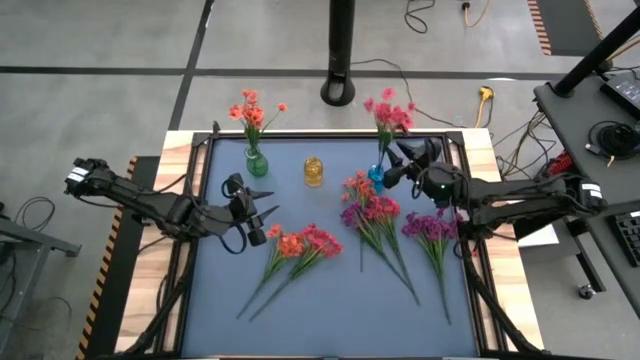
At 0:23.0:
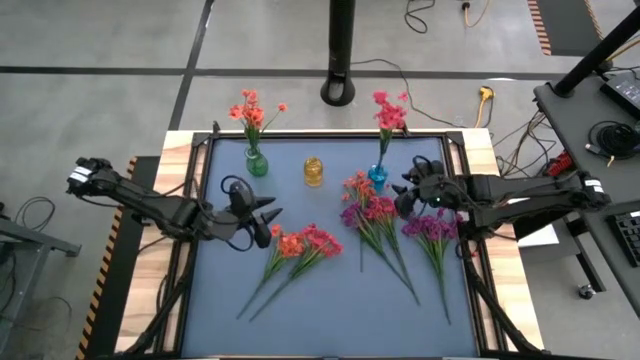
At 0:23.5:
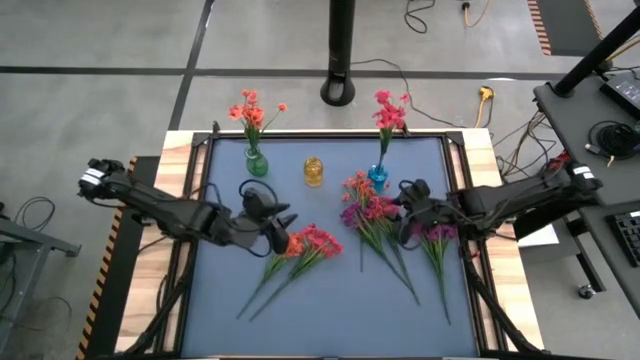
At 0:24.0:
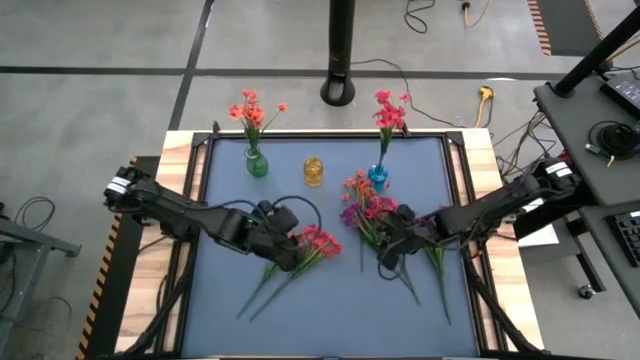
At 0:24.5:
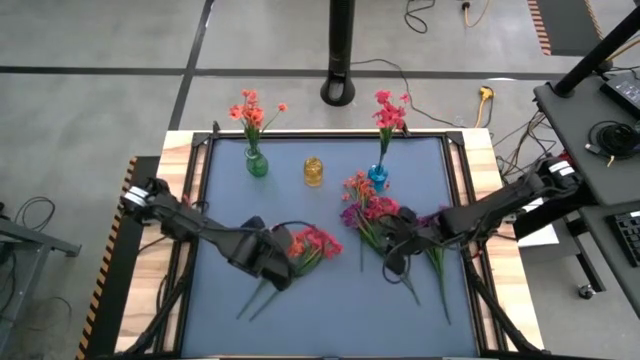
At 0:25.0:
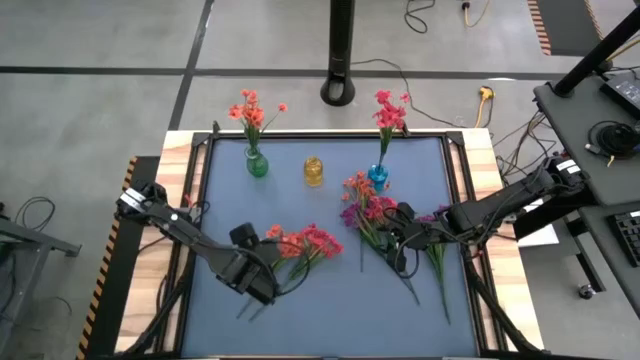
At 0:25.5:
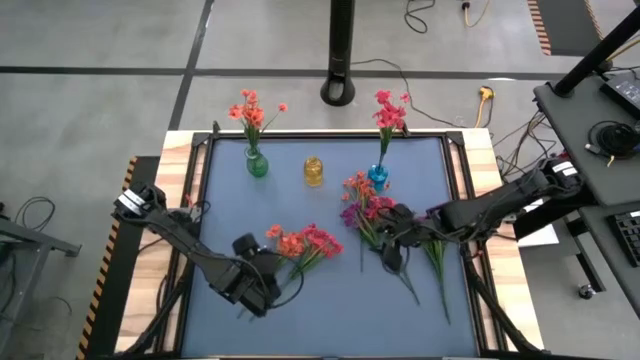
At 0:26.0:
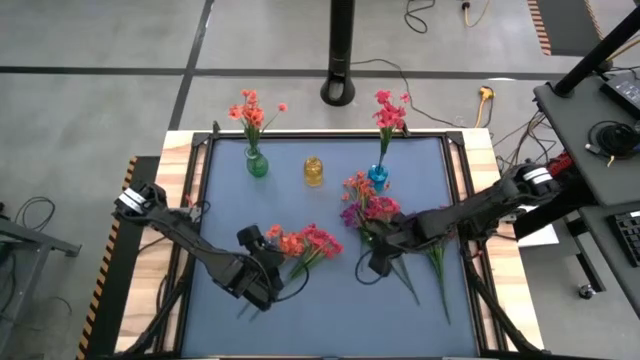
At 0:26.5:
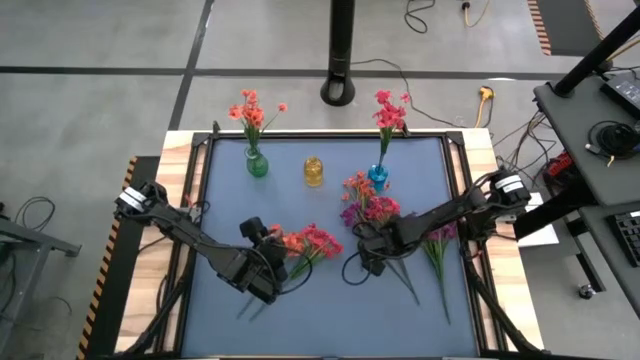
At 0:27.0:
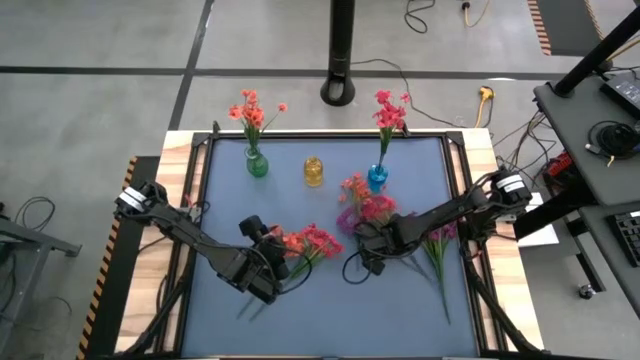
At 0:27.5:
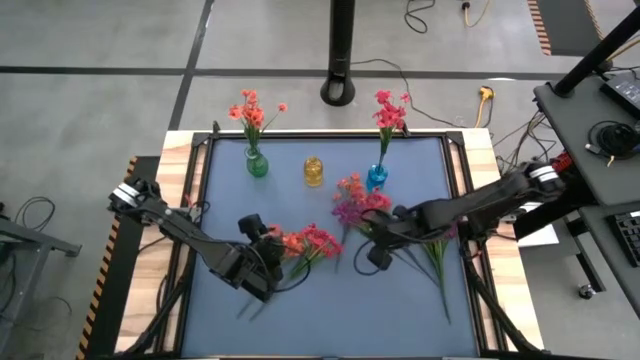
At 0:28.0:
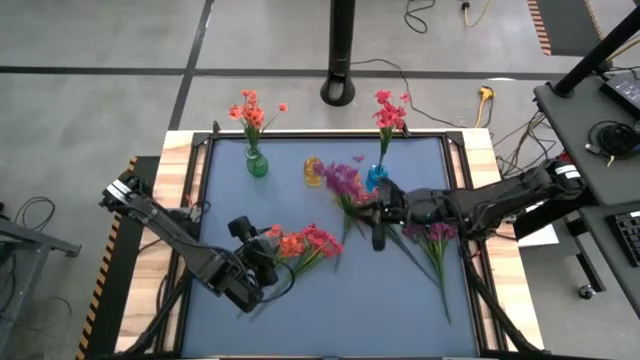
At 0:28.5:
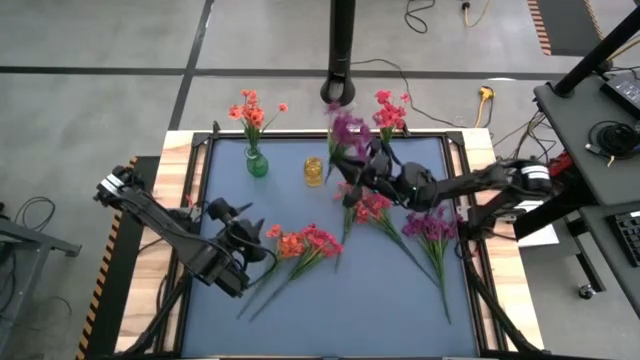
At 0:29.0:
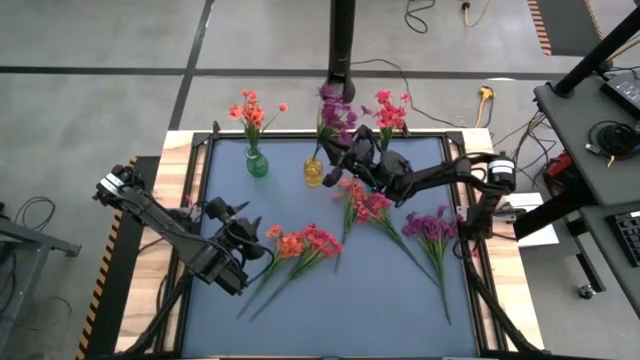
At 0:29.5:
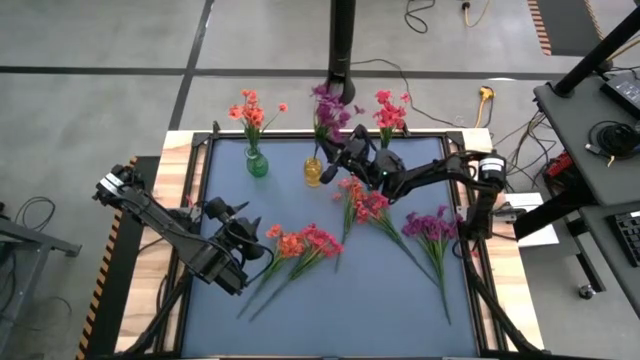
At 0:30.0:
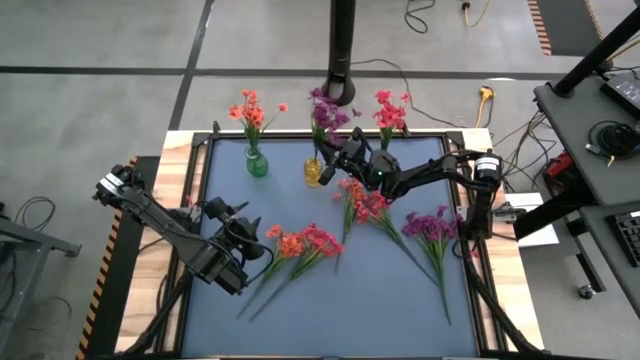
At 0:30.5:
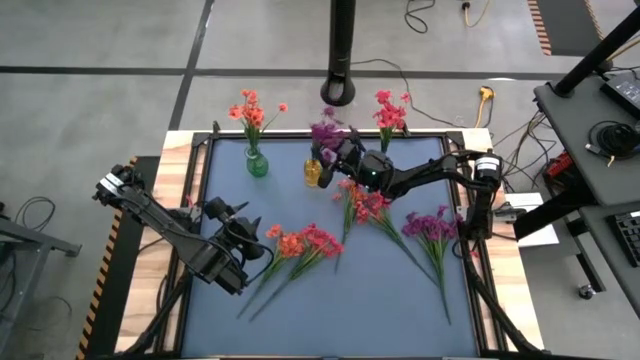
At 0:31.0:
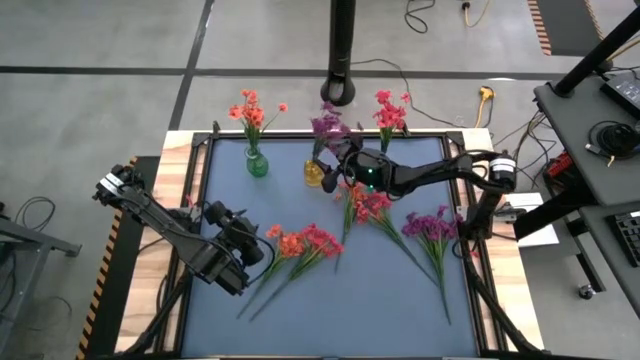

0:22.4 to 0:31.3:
Task: Sort flowers into vase by color
Put the left violet flowers into the yellow vase

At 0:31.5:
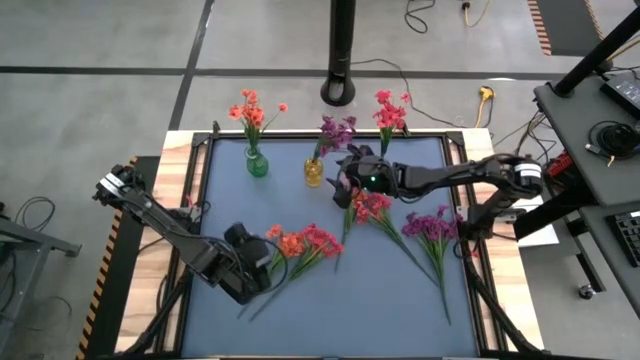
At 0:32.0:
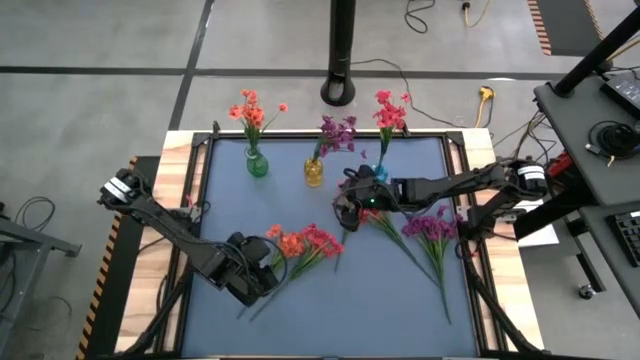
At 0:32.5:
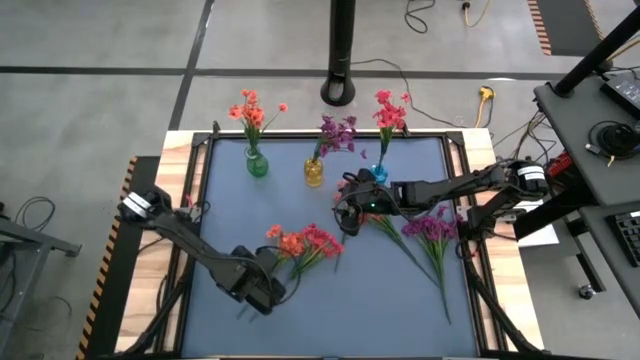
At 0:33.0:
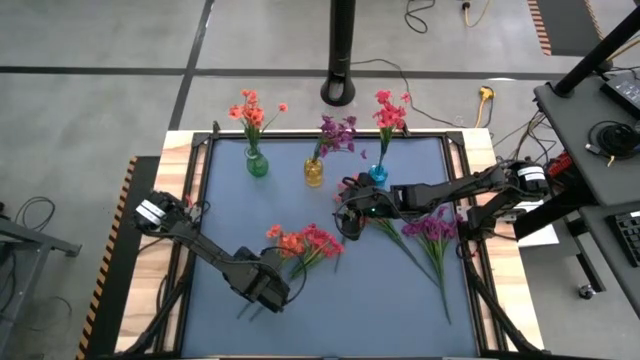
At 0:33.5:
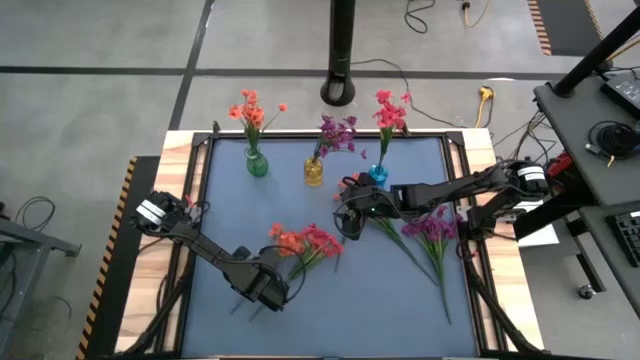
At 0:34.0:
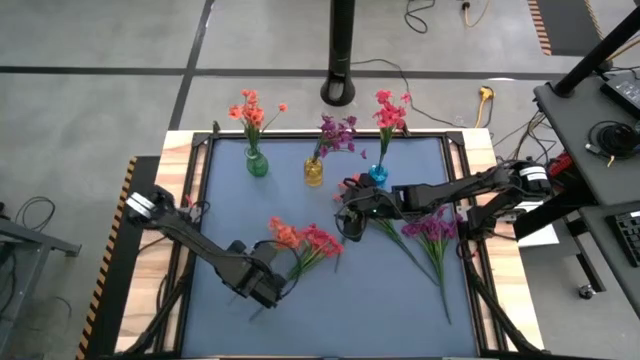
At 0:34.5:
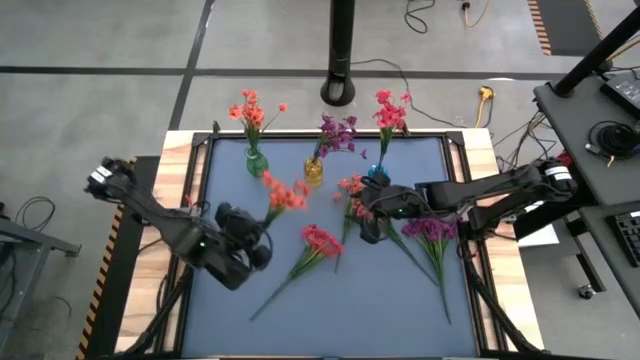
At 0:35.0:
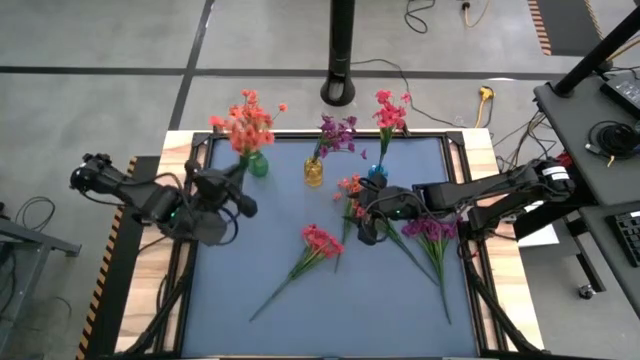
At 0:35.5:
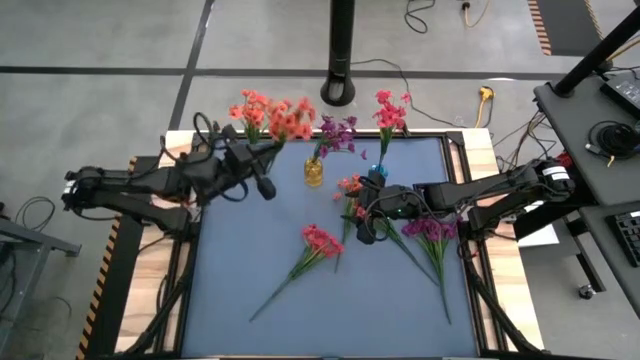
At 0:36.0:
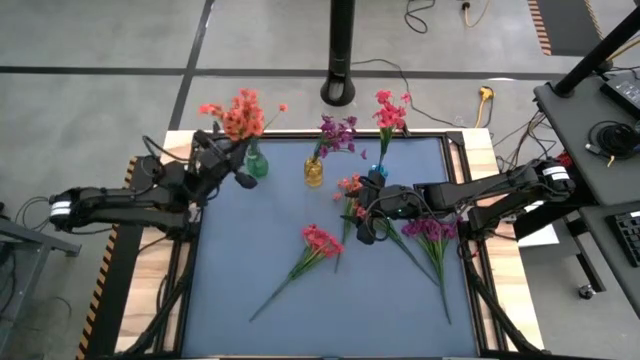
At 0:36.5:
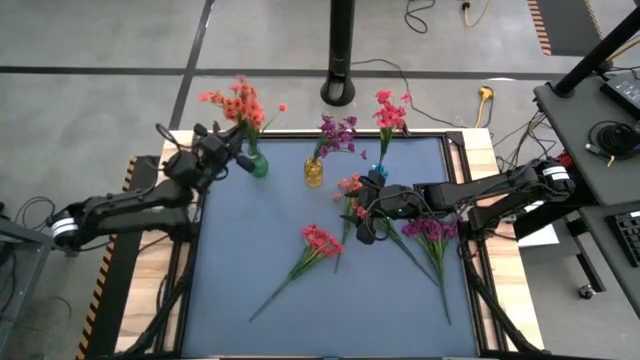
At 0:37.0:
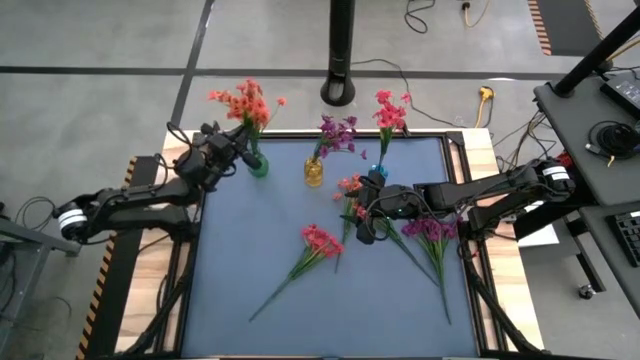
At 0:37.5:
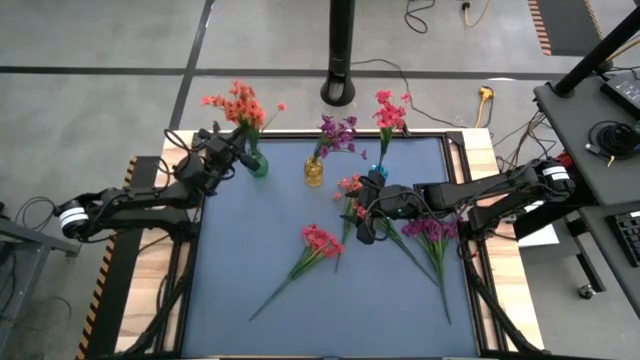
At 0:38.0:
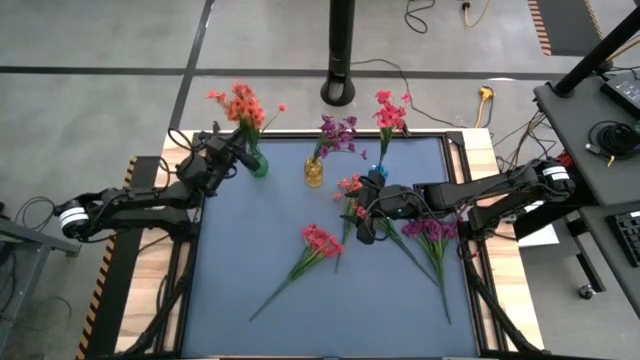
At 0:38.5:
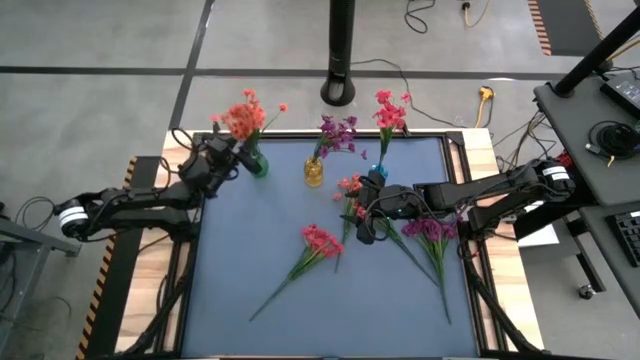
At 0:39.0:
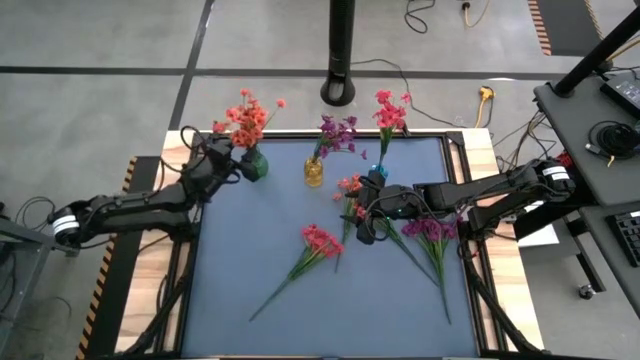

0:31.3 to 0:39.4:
Put the bottom orange flowers into the green vase

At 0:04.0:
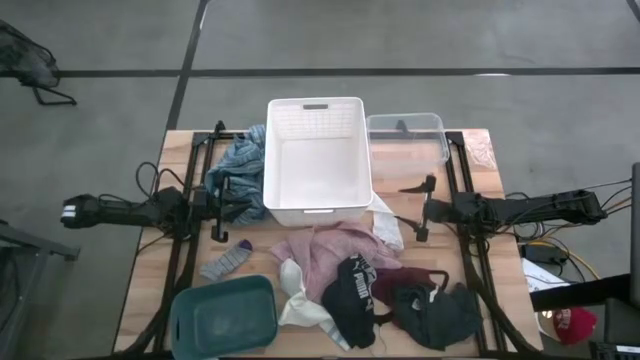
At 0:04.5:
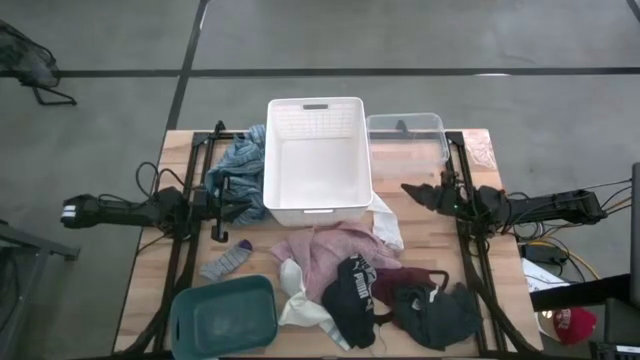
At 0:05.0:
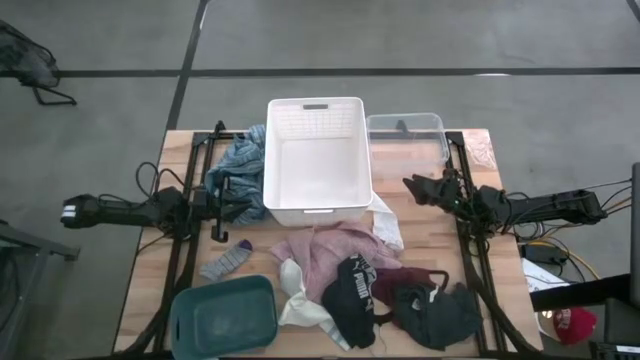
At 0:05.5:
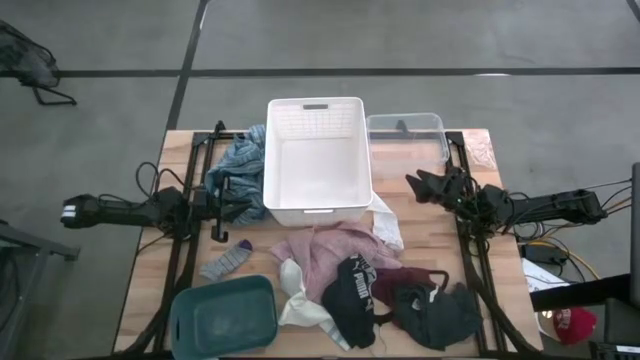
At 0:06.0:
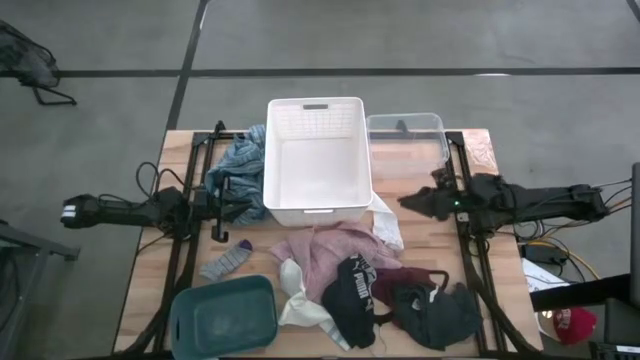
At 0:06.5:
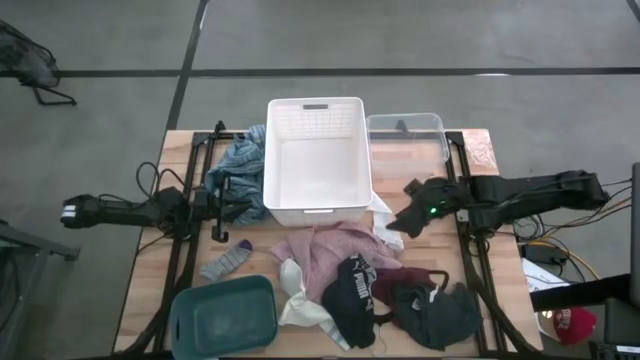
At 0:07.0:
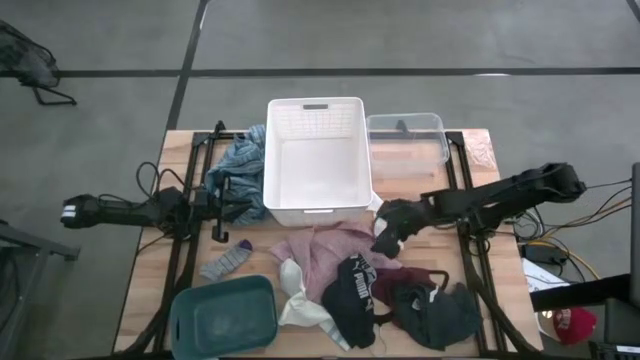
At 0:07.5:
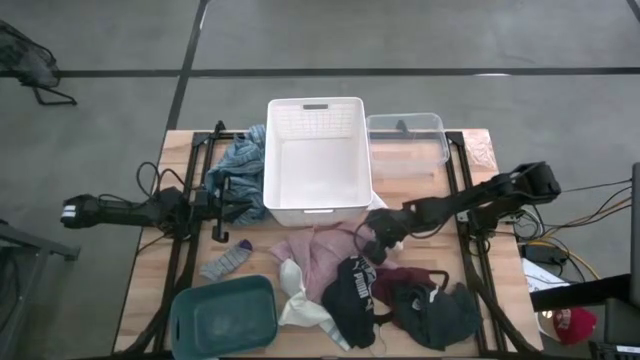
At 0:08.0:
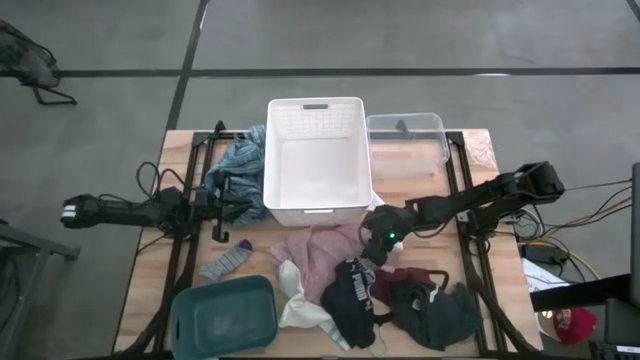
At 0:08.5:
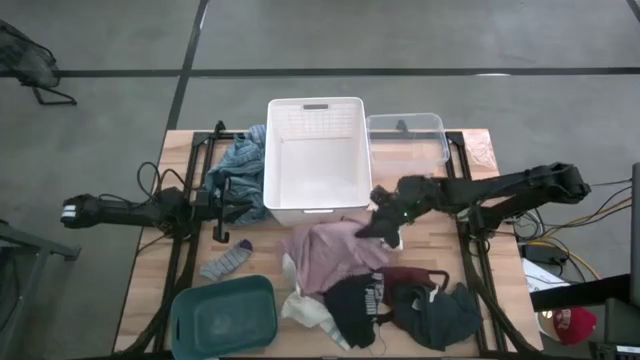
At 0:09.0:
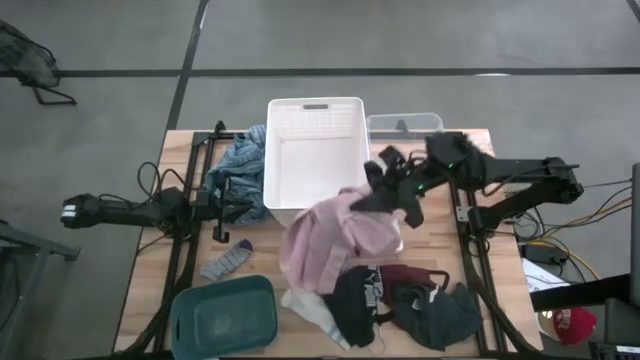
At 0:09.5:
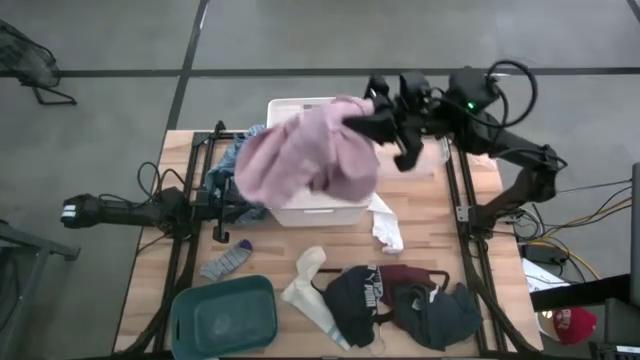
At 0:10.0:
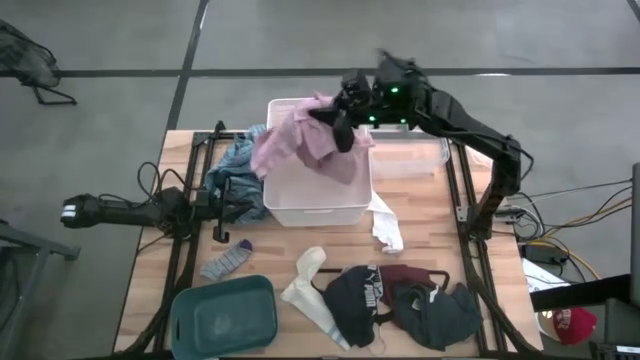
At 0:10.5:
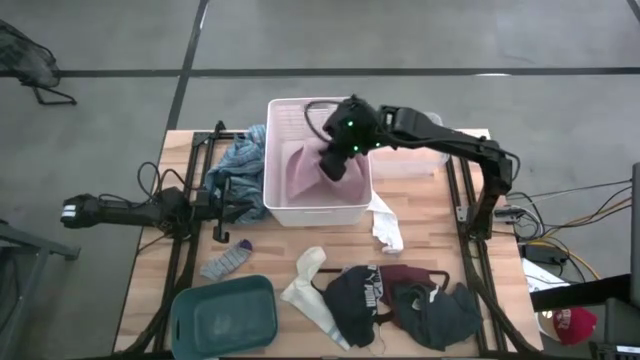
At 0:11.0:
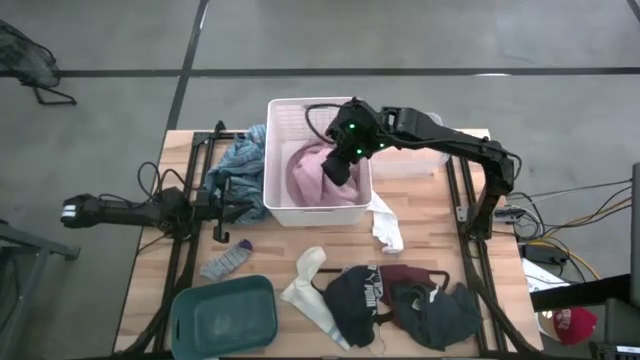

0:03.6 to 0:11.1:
Task: Pick & Place Cloths
Put the pink towel into the white laundry basket
